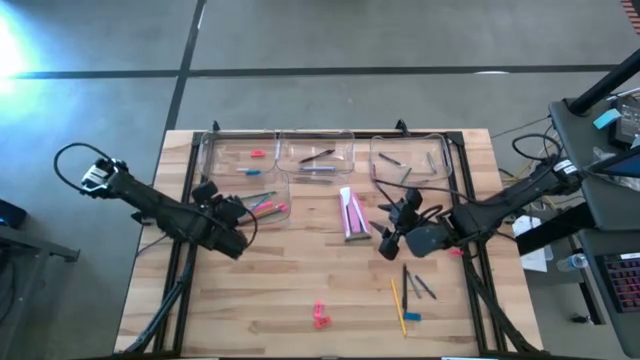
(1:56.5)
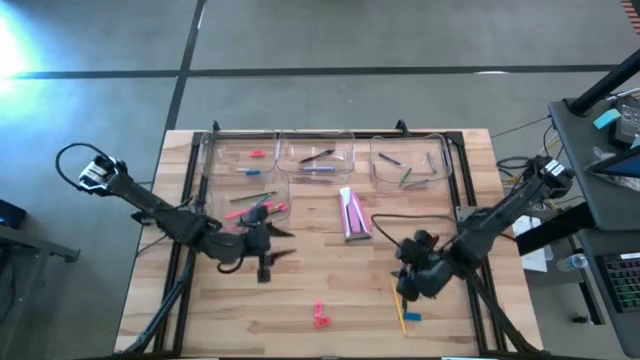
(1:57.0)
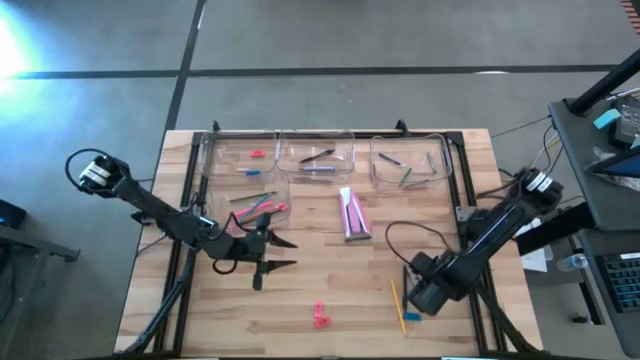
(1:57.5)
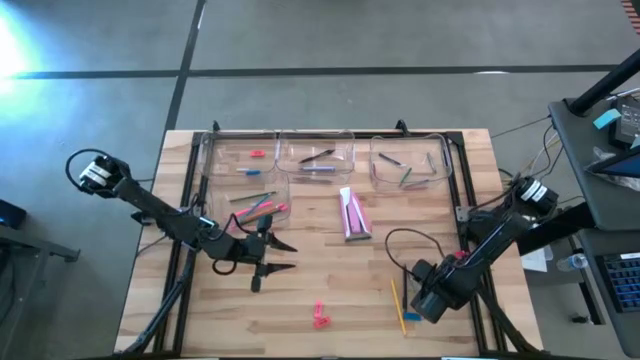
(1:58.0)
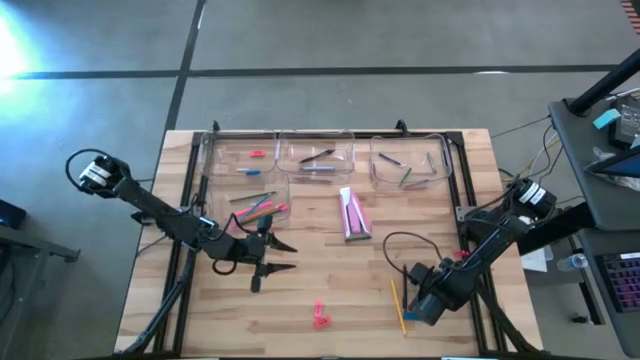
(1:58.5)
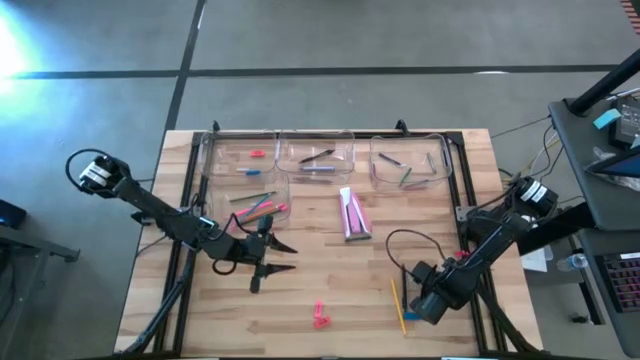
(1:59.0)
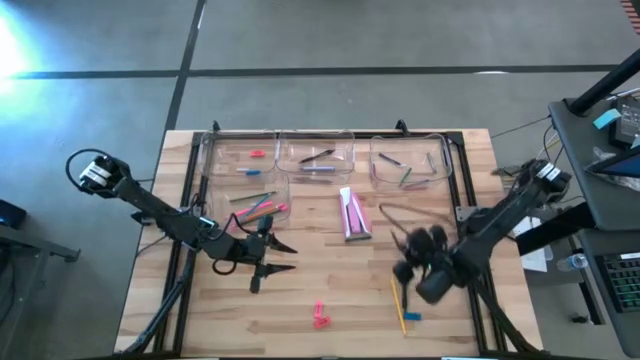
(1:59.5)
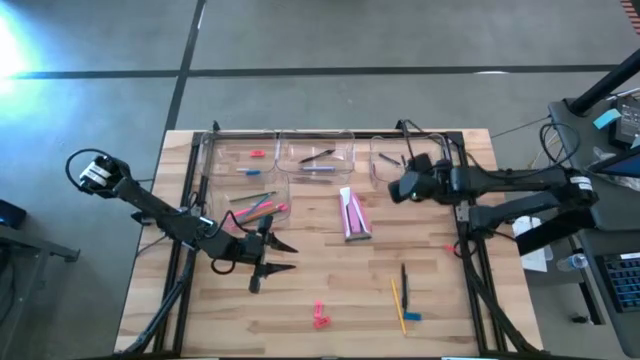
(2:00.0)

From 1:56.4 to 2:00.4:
Task: Sort crayons/erasers/pens/pencils in bins
Put the blue crayon into the top right transparent bin

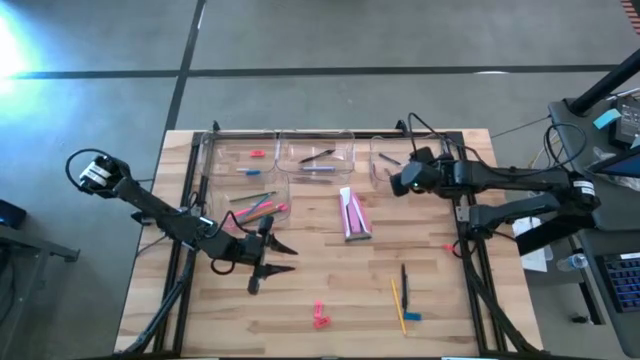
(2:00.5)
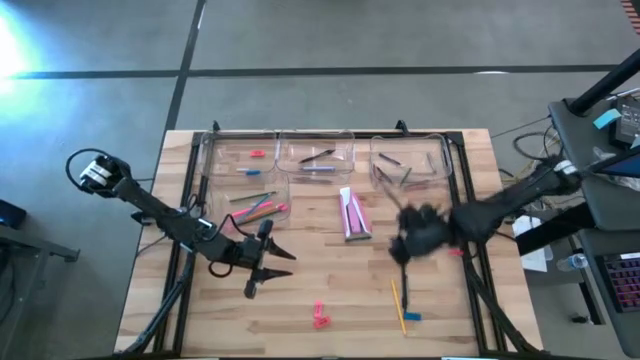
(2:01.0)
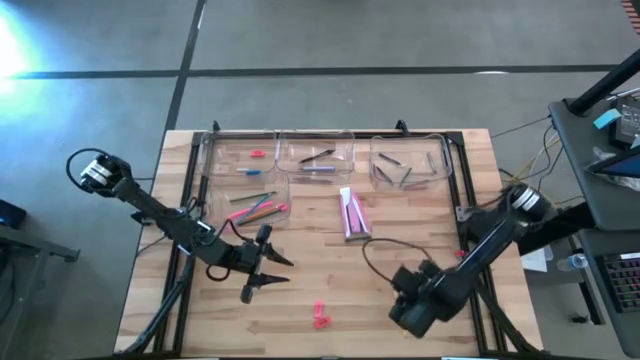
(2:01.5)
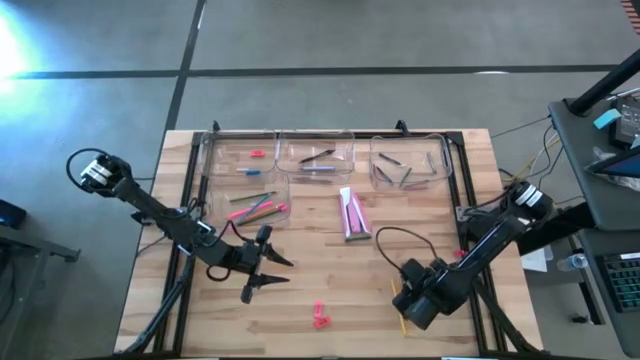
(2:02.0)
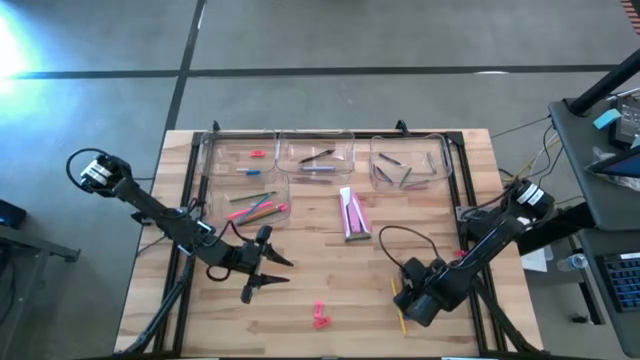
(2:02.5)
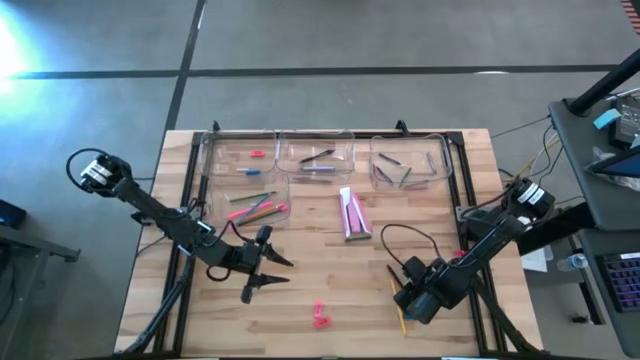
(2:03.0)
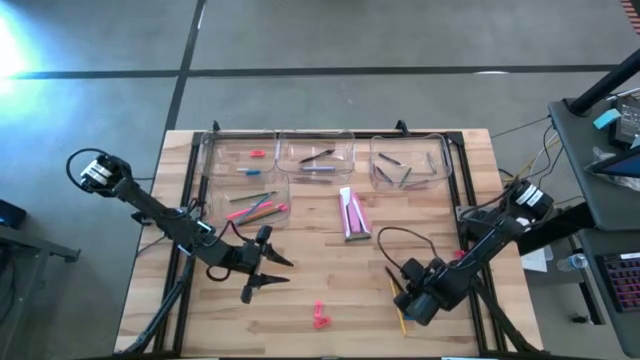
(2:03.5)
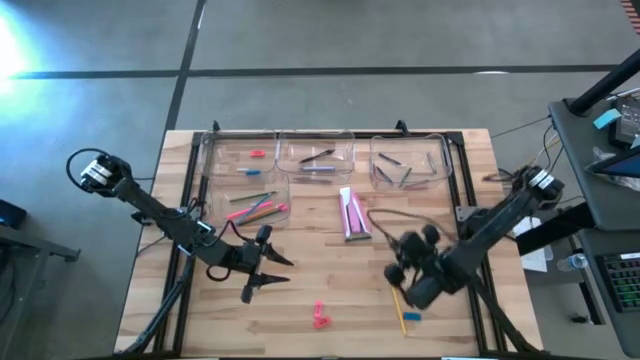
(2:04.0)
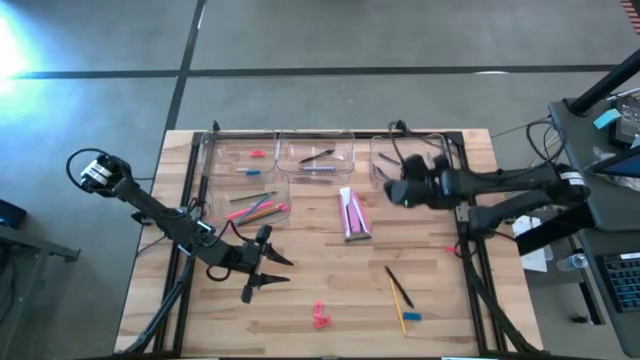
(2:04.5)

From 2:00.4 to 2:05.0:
Put the gray crayon into the top right transparent bin

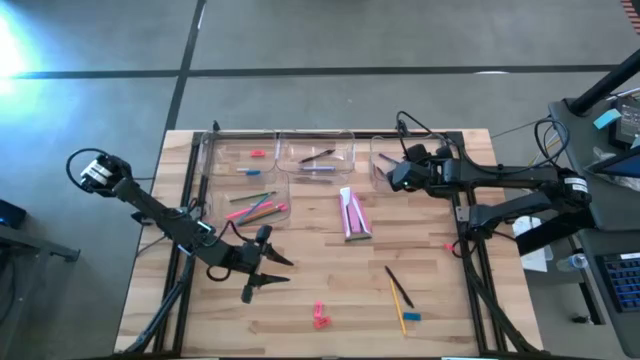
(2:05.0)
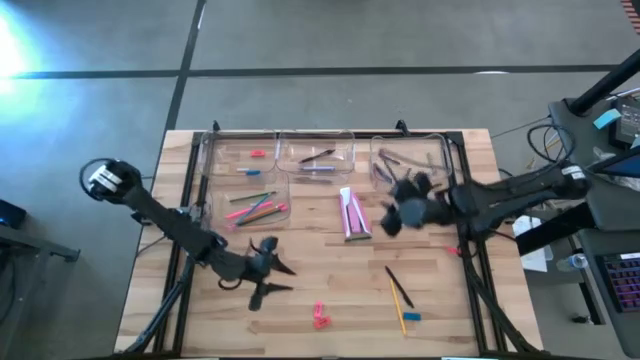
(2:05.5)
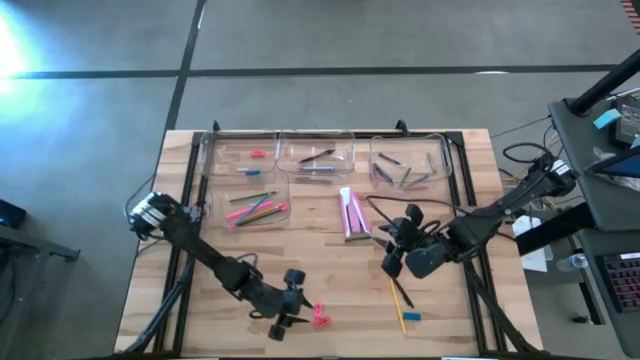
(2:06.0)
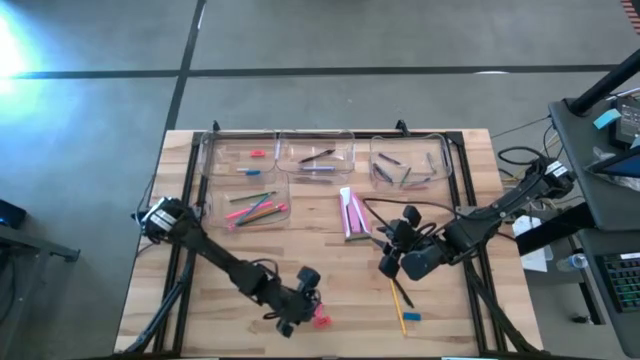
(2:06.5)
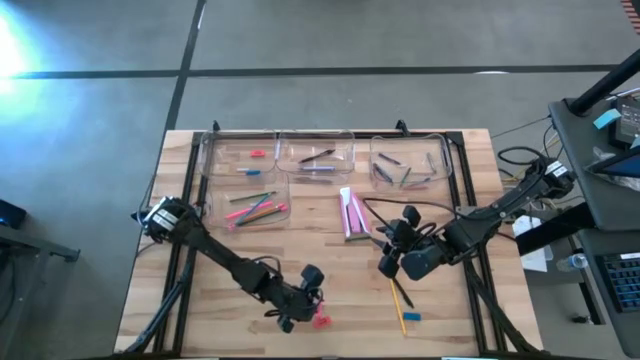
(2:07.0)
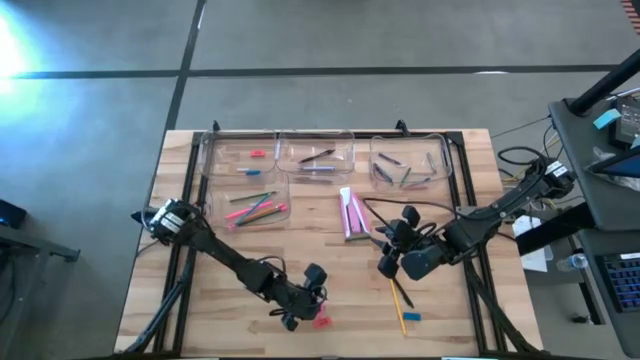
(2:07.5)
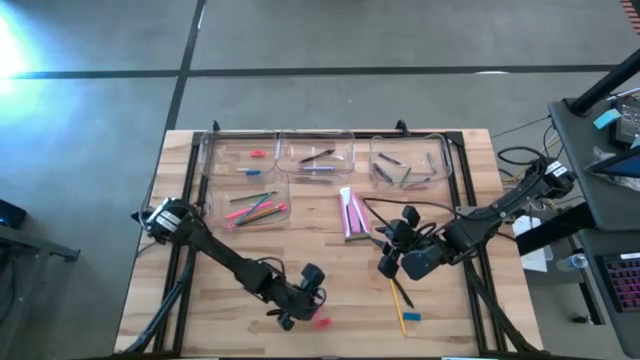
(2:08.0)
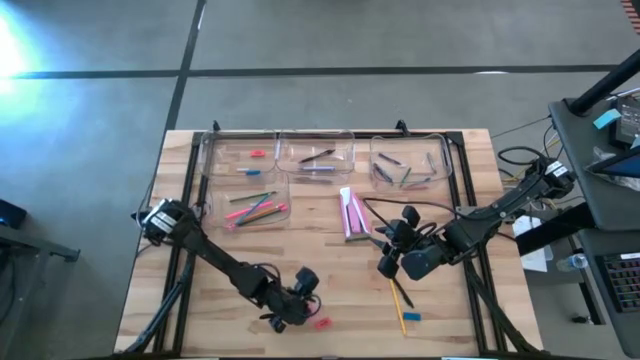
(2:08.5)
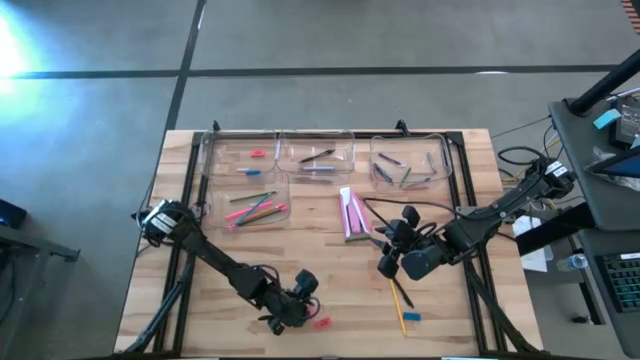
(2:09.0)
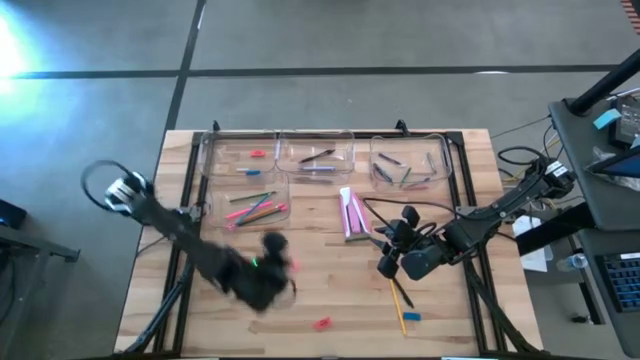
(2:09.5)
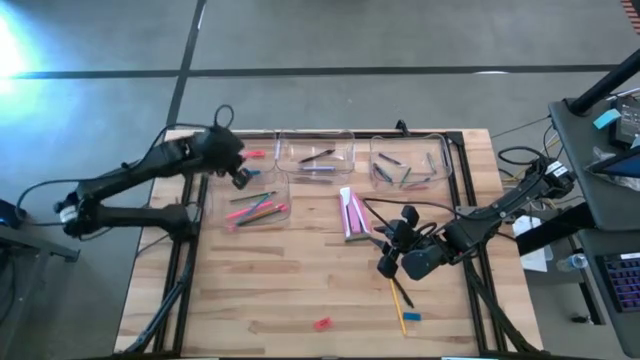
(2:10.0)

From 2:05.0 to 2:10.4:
Put the pink eraser into the top left transparent bin

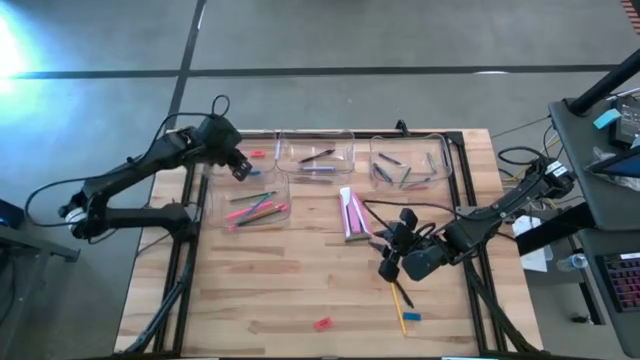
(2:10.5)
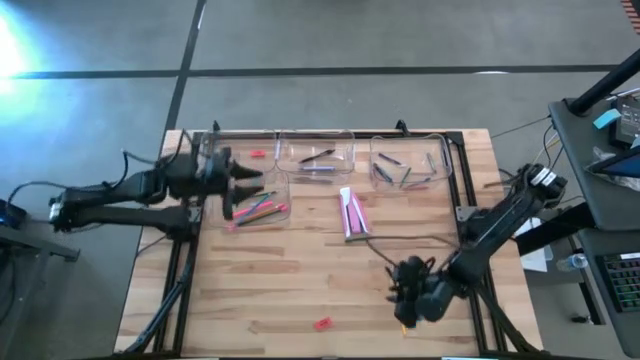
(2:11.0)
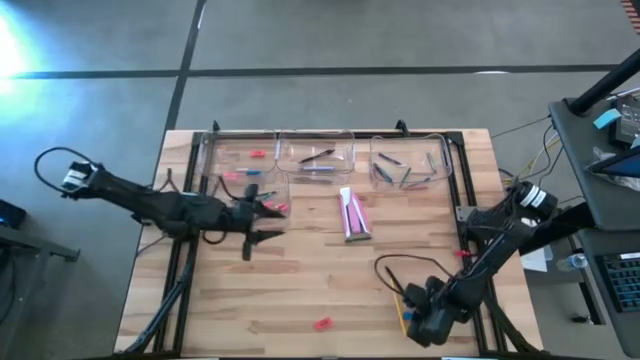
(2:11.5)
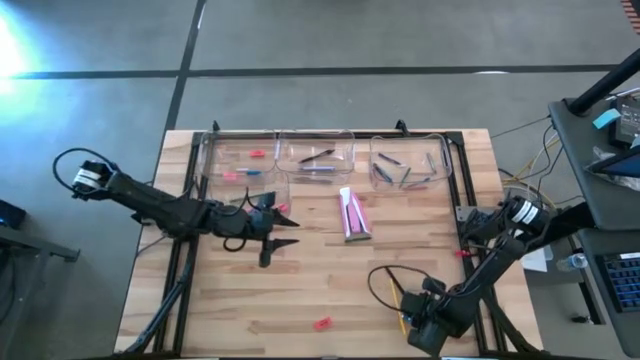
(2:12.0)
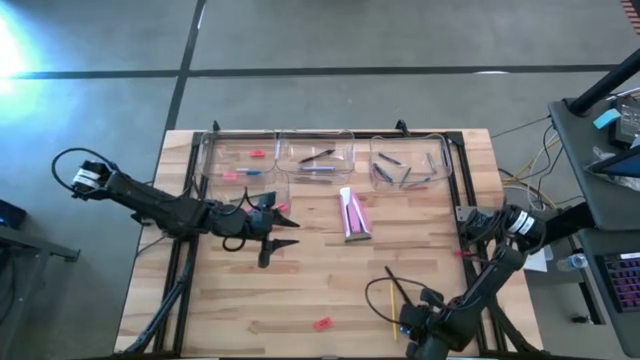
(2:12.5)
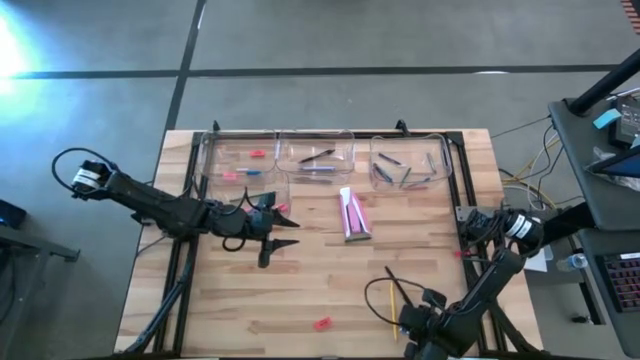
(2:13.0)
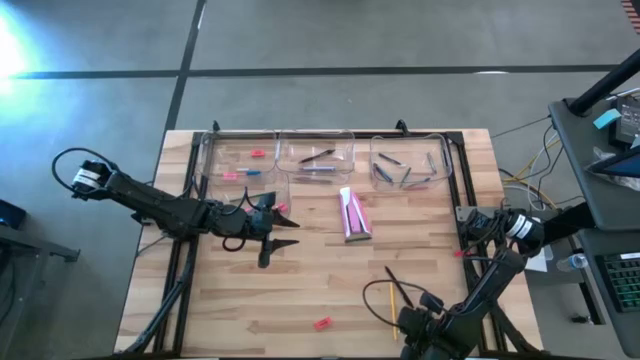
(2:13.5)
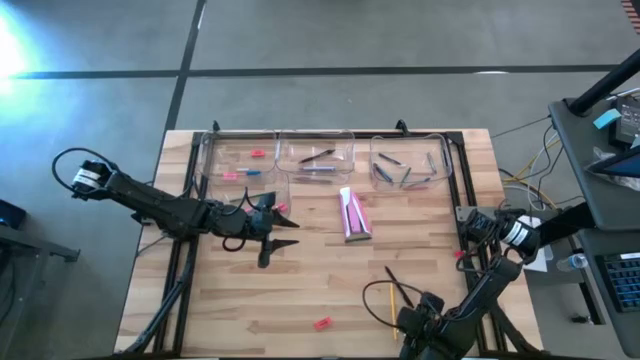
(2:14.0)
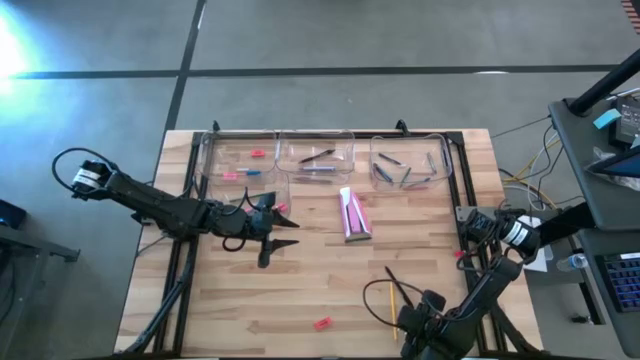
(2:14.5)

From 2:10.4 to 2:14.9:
Put the blue eraser into the top left transparent bin

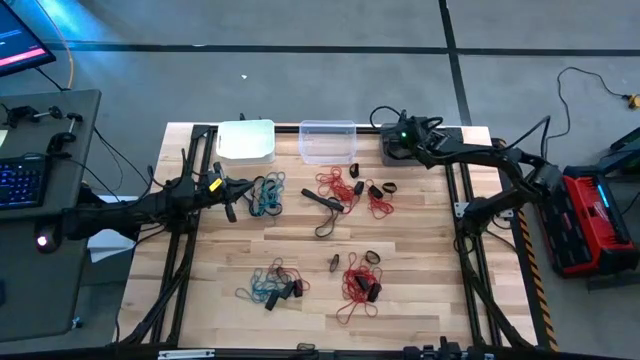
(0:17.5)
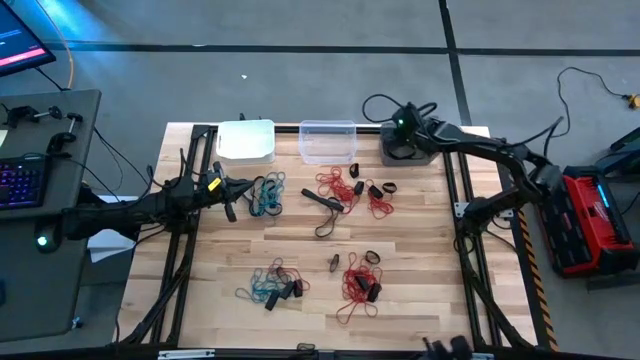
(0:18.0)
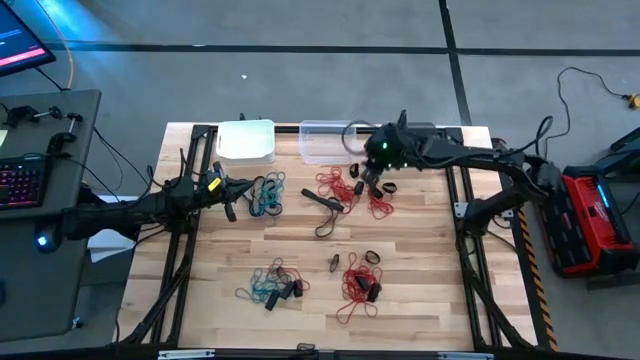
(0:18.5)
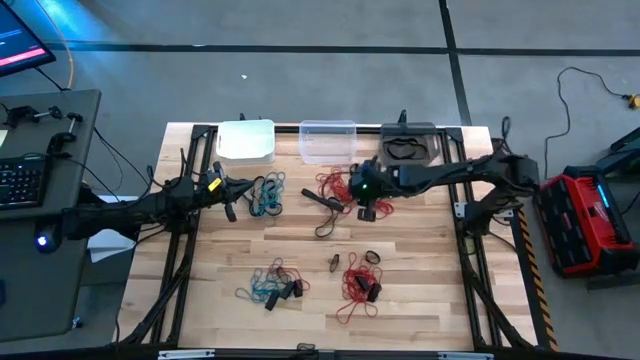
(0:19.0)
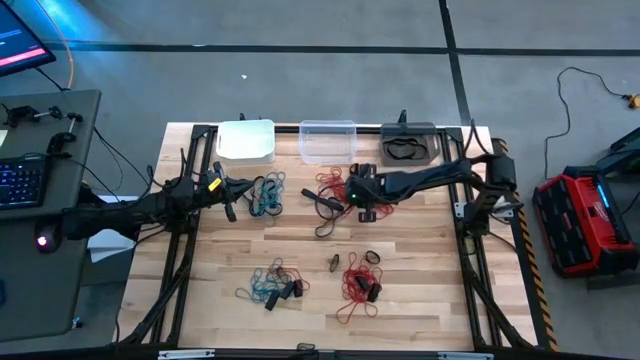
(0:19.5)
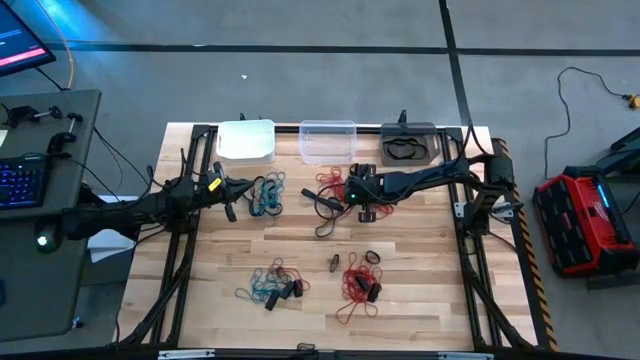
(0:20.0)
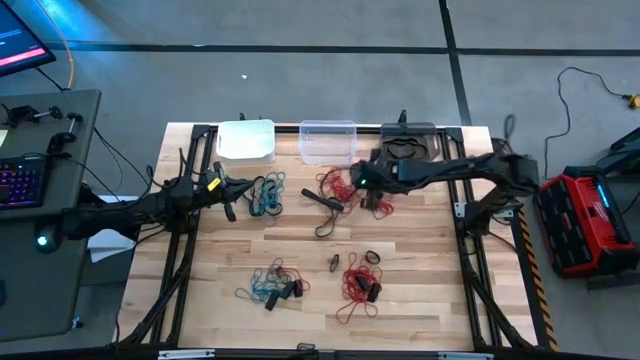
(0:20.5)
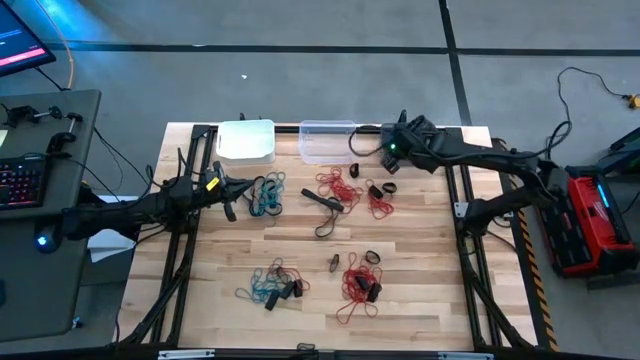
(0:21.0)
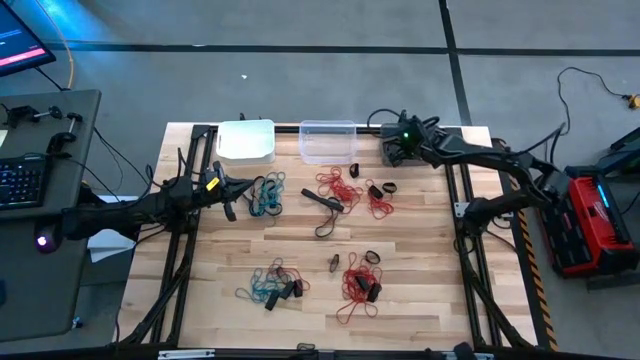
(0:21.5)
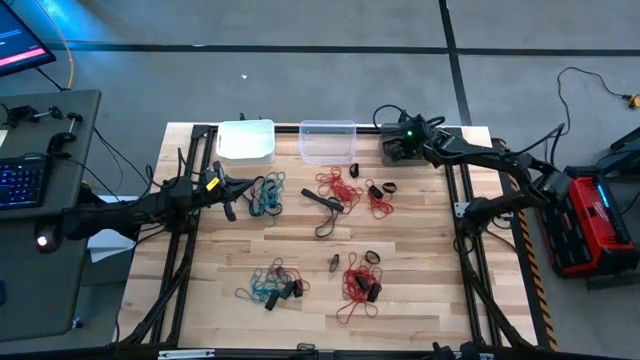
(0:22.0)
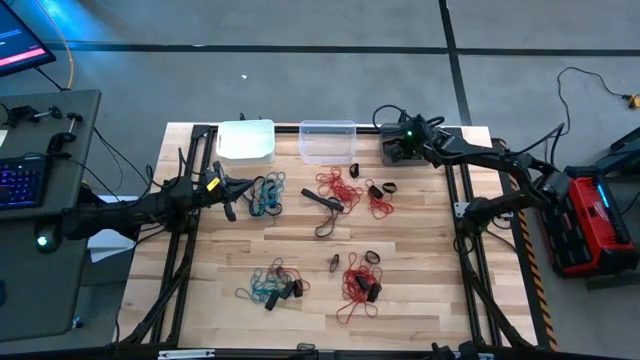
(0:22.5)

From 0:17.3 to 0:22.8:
Task: Sort rubber bands into baskets
Put the black rubber band into the black bin
